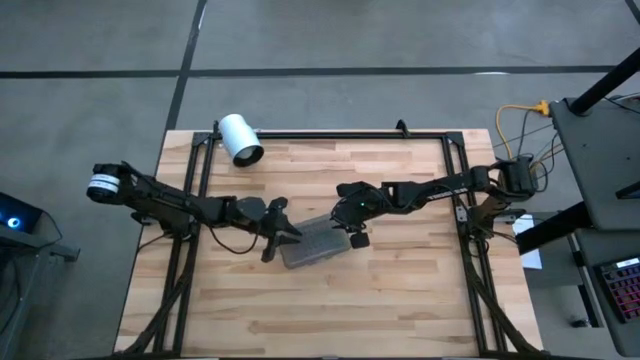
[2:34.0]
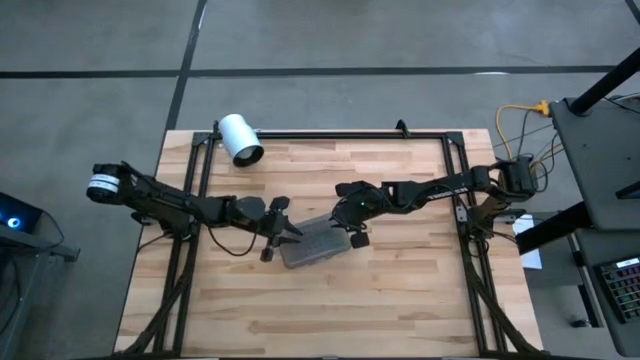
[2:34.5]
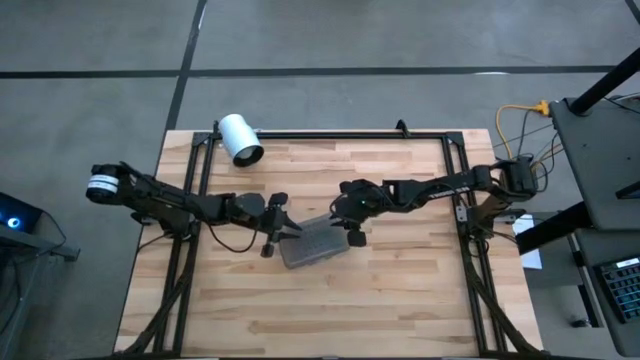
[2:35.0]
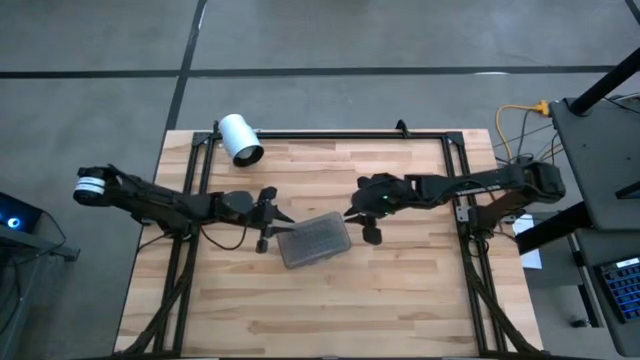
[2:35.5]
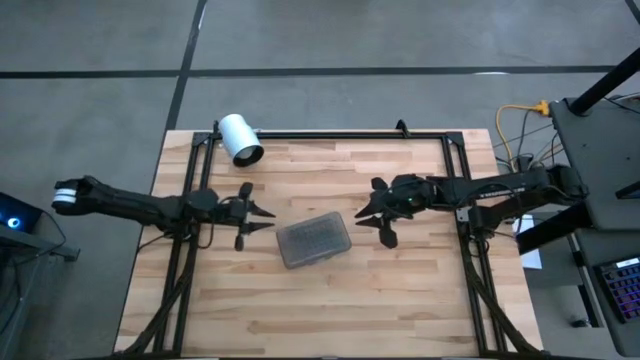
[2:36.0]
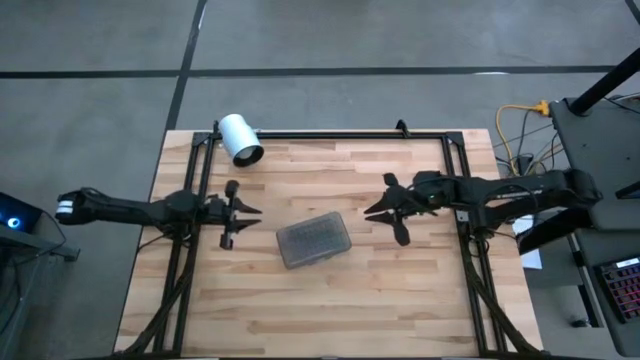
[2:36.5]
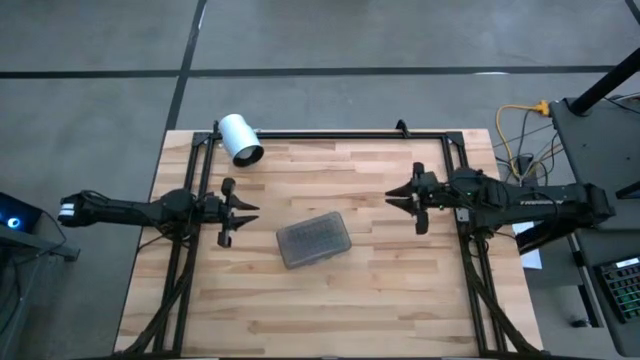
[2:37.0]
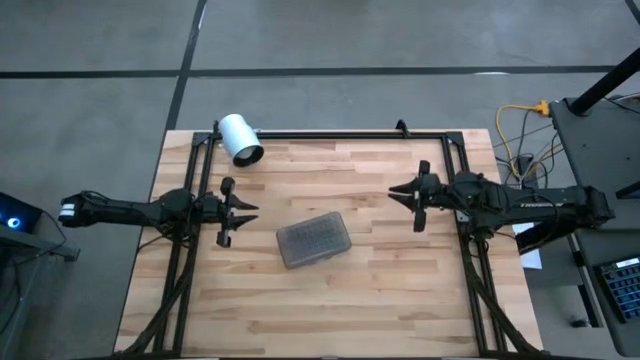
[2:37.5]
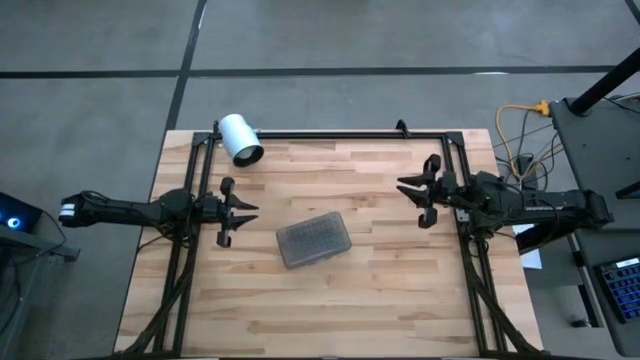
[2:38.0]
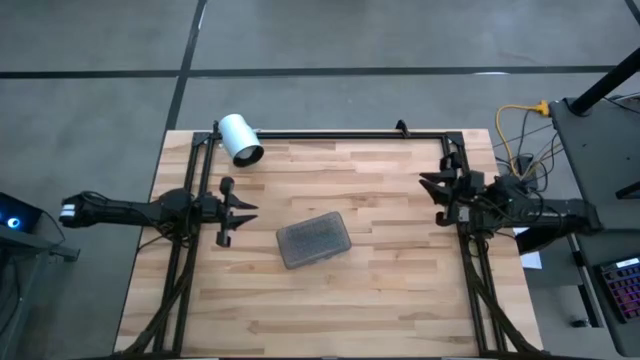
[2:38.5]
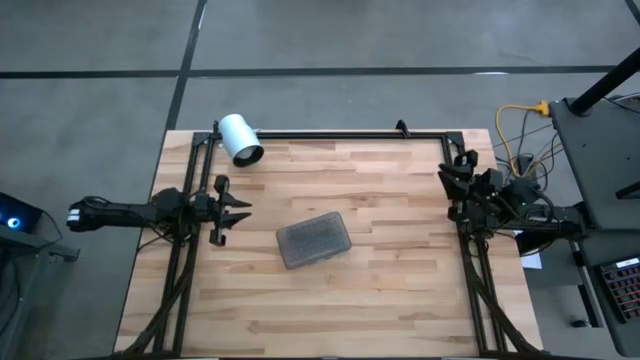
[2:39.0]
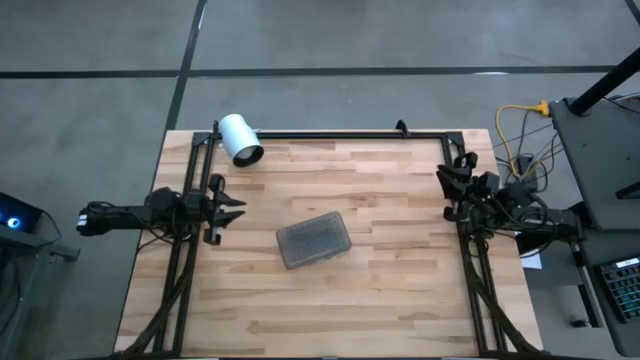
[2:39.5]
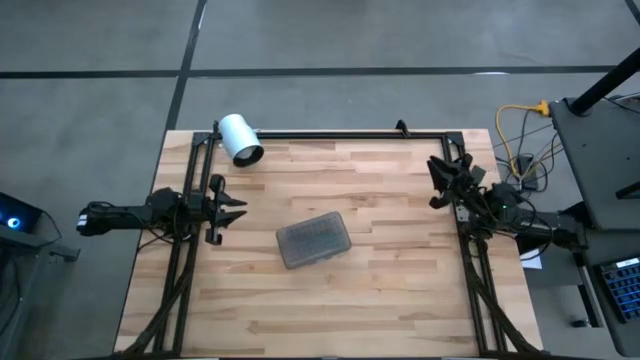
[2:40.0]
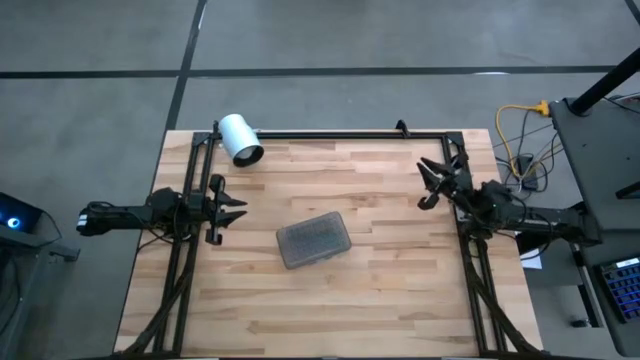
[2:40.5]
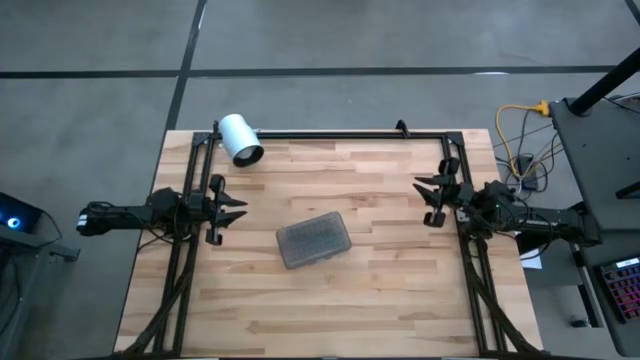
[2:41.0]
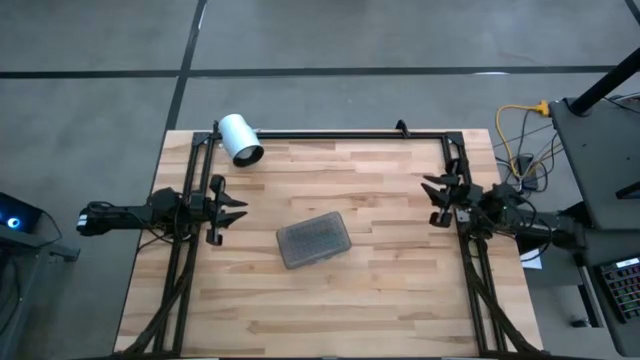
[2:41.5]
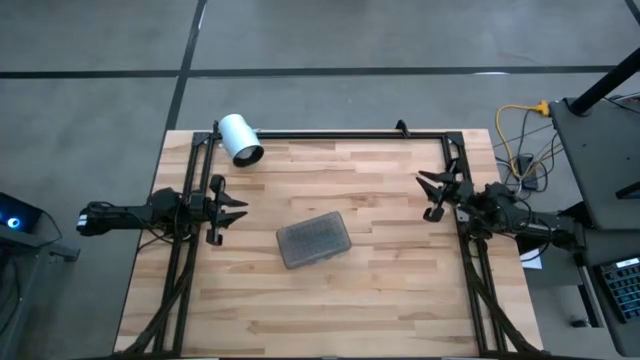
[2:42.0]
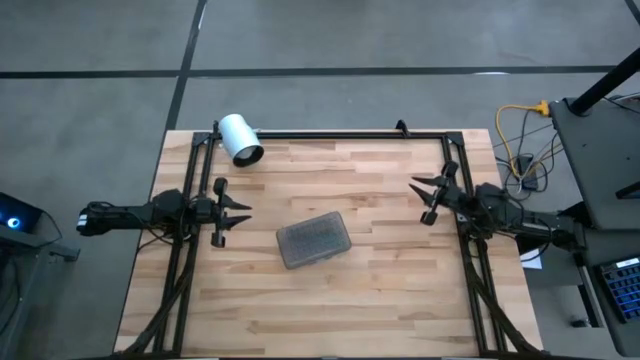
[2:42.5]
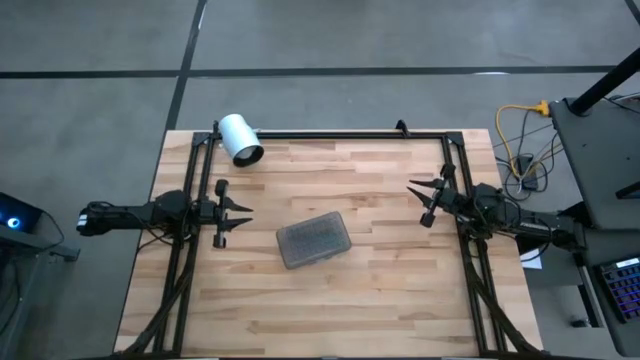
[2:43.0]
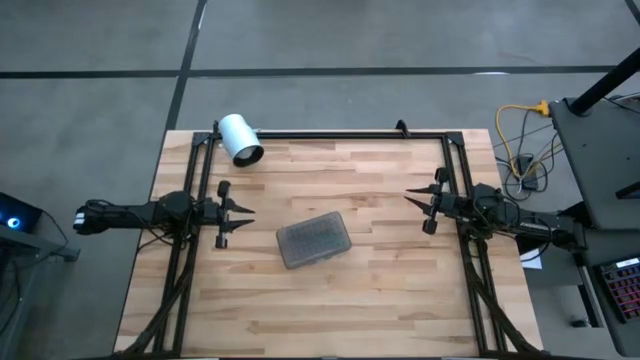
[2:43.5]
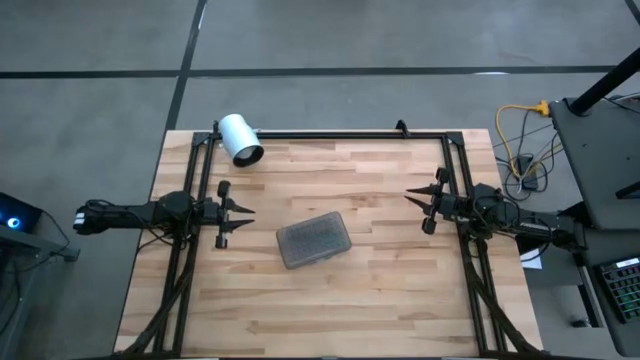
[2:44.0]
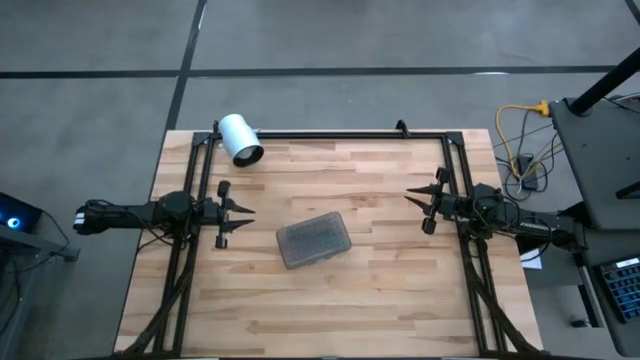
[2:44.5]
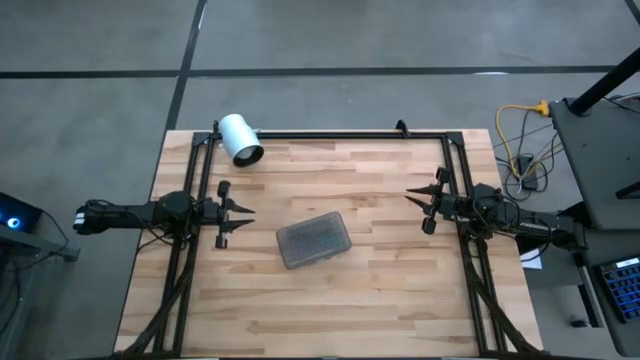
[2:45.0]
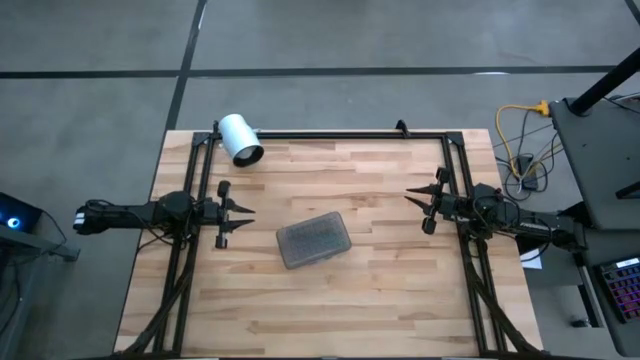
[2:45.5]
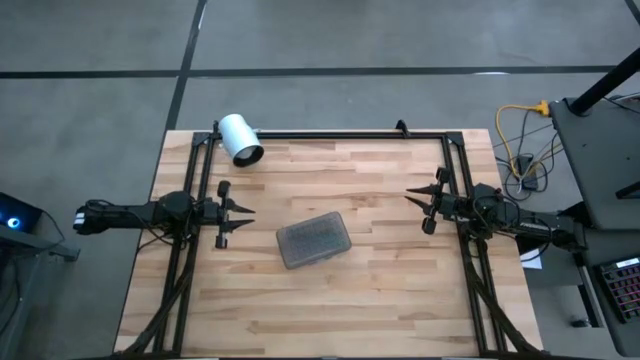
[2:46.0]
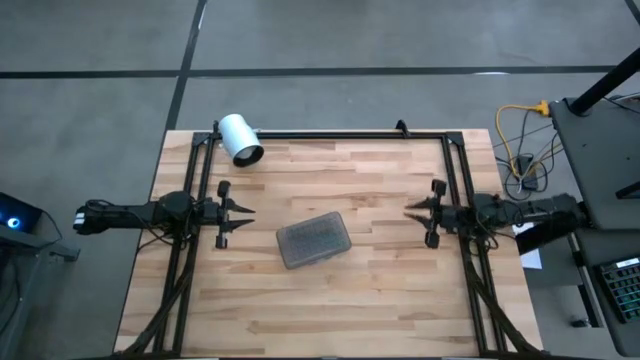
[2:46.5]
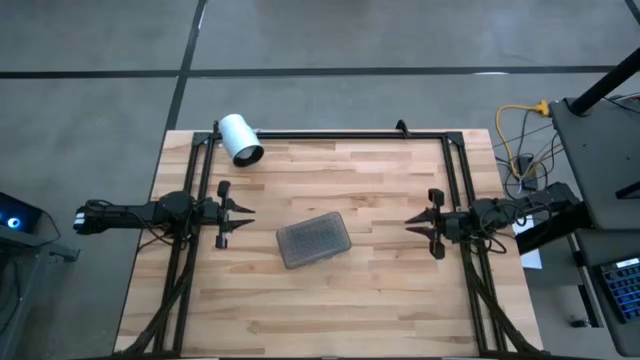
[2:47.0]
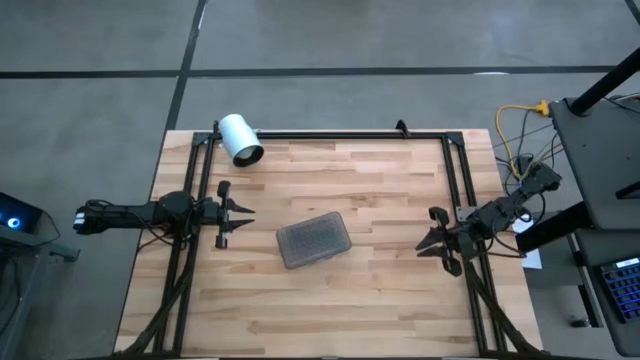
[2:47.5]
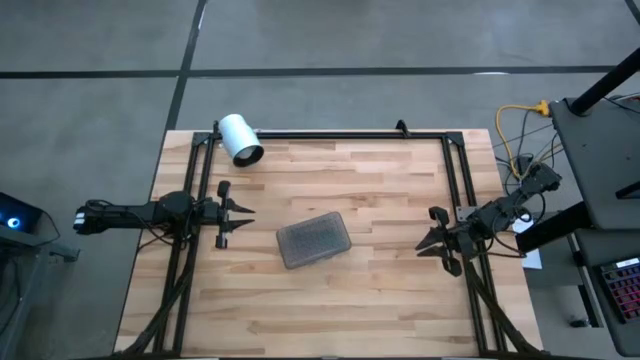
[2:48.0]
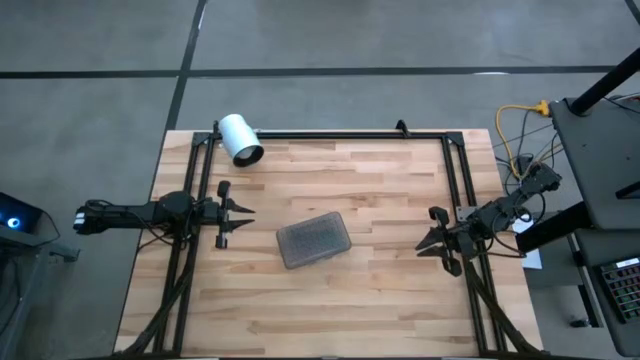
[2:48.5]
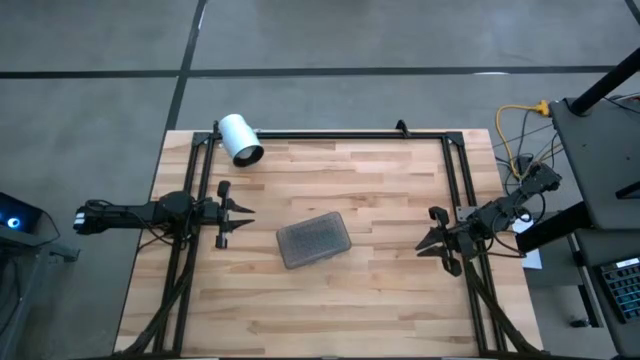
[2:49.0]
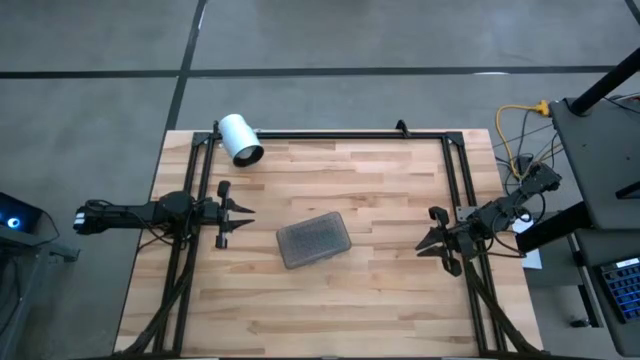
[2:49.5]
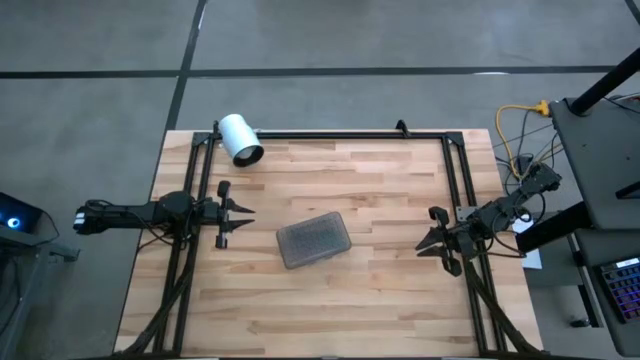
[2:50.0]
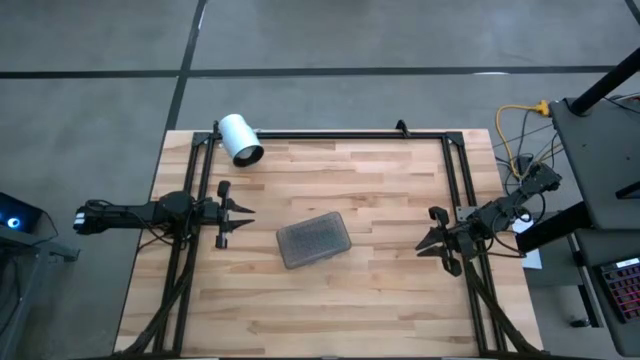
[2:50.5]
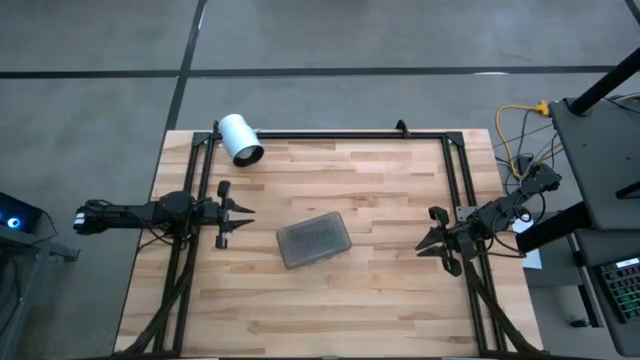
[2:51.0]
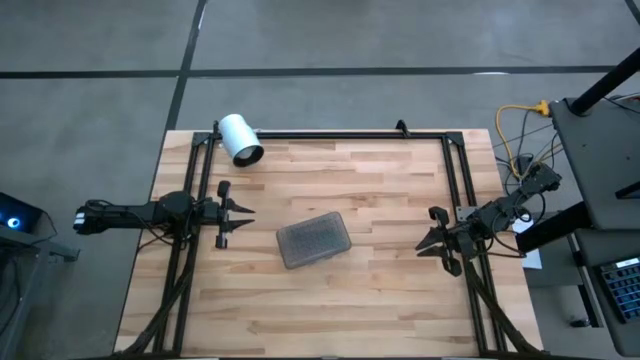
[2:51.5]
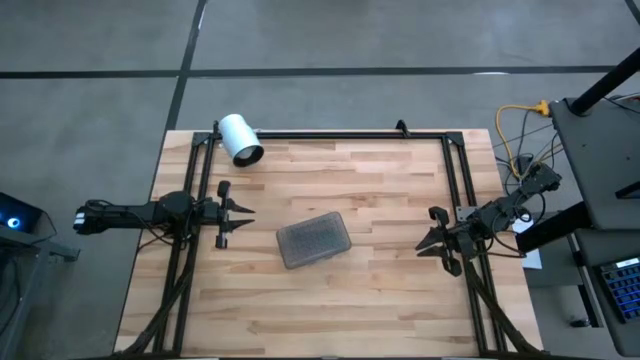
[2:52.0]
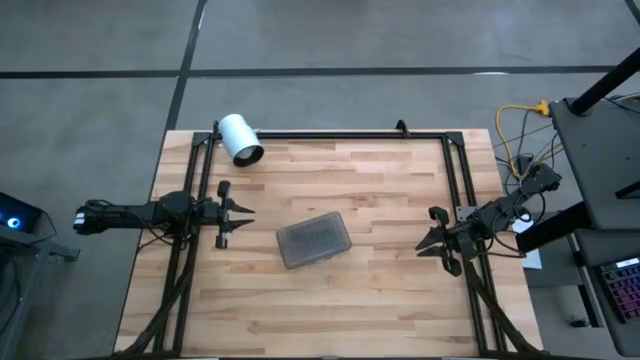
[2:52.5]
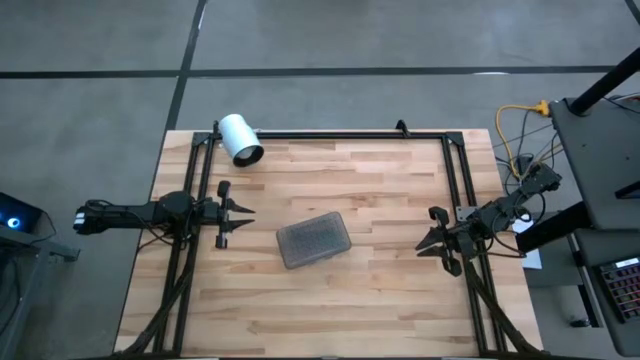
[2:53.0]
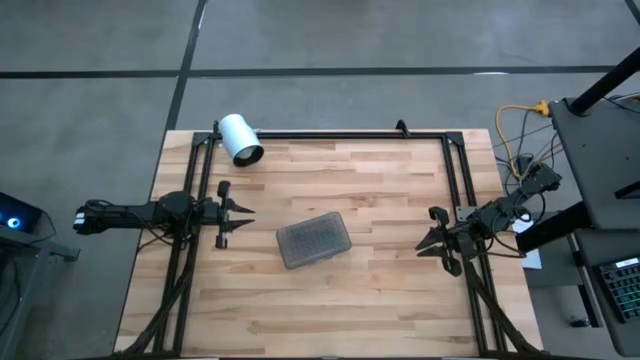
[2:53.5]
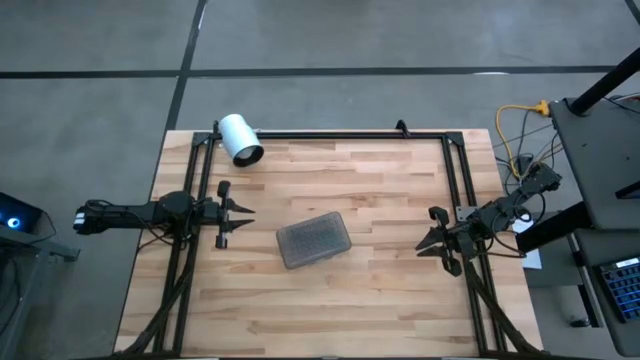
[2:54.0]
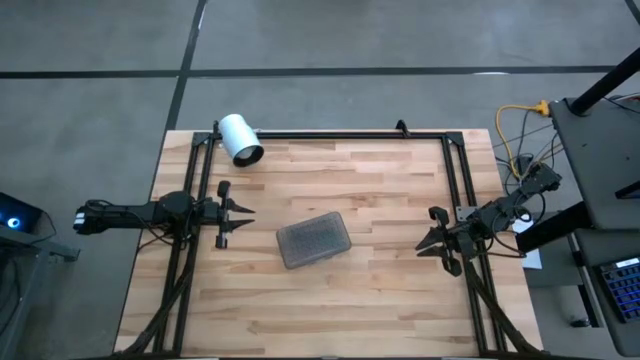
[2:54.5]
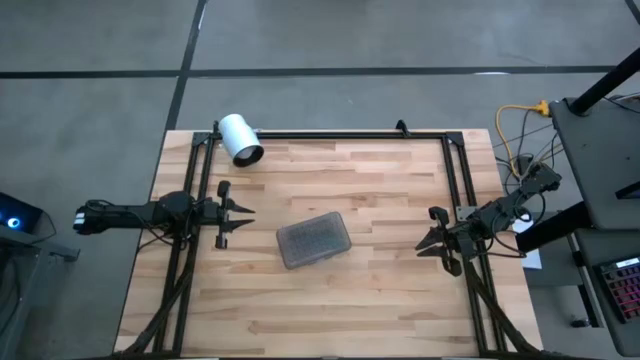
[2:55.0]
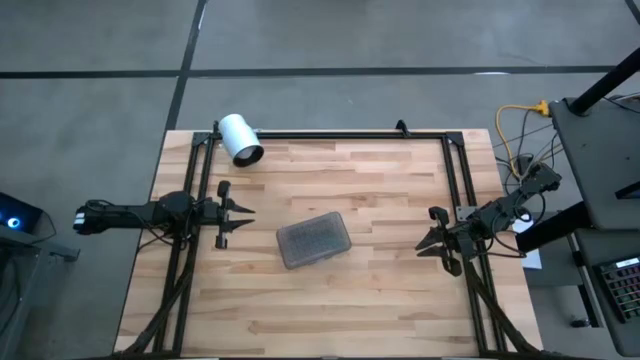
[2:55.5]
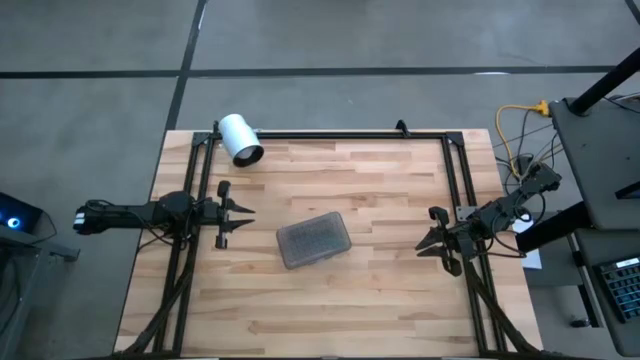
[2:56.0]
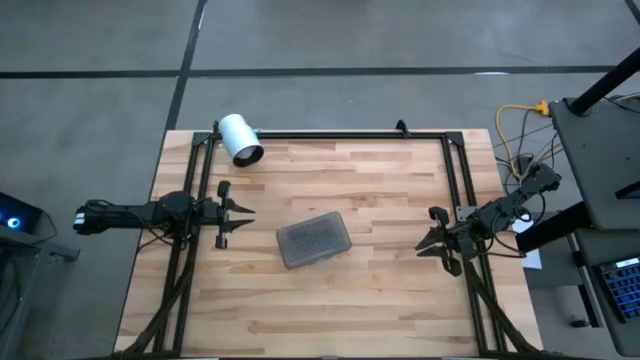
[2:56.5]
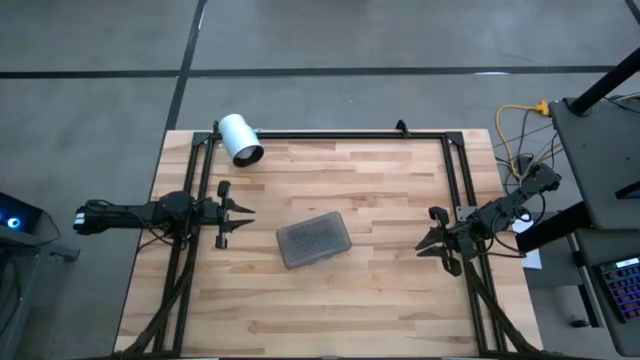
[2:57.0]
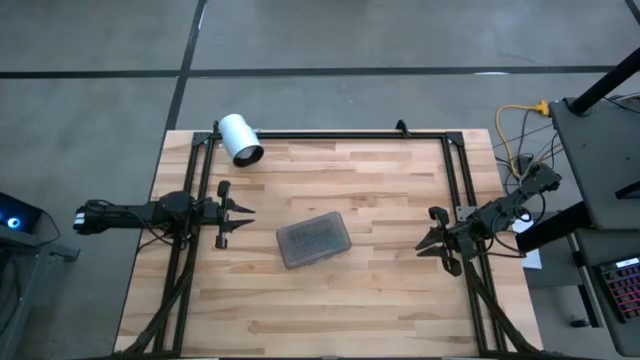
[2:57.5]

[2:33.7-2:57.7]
Task: Pick & place school supplies into a supply box
Return to Home Position
